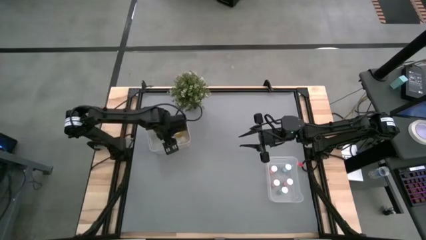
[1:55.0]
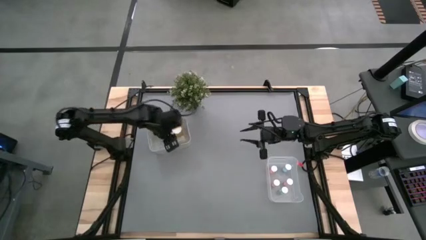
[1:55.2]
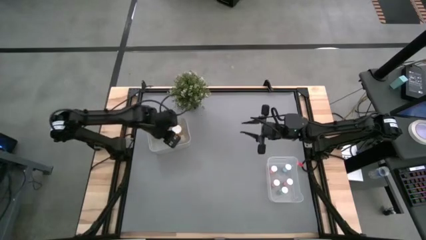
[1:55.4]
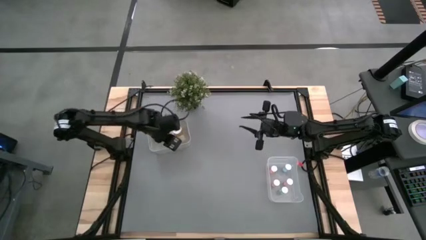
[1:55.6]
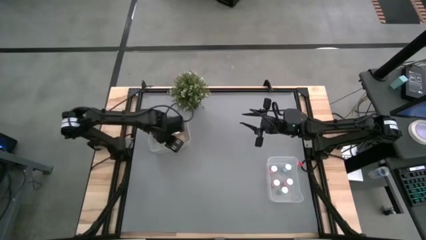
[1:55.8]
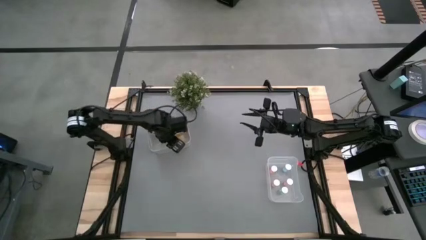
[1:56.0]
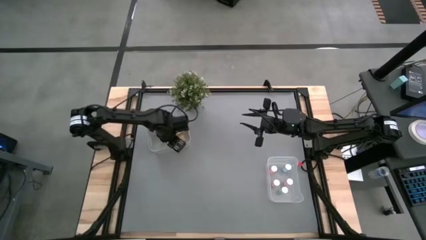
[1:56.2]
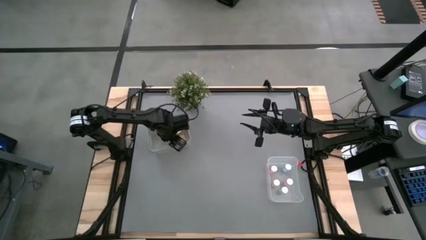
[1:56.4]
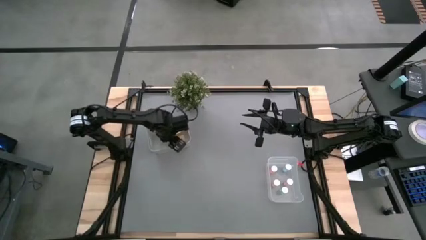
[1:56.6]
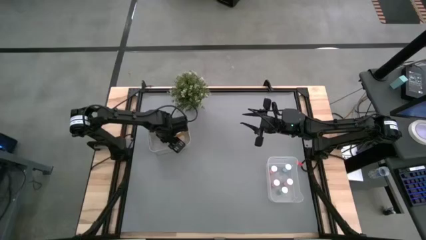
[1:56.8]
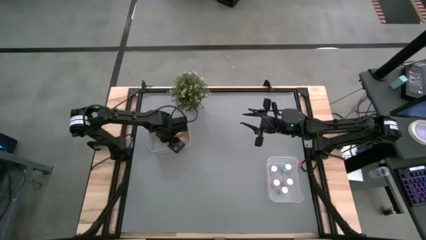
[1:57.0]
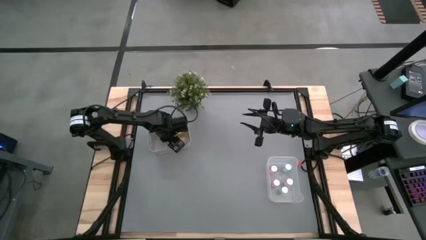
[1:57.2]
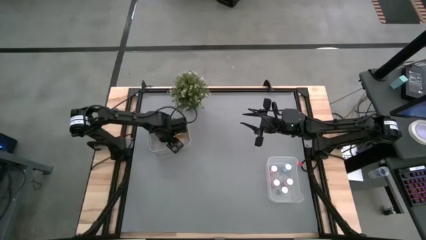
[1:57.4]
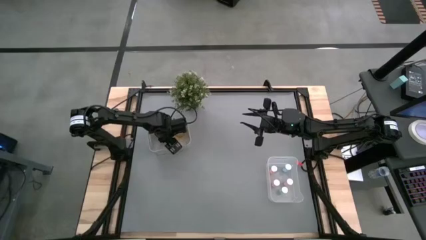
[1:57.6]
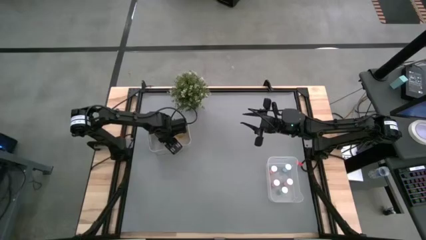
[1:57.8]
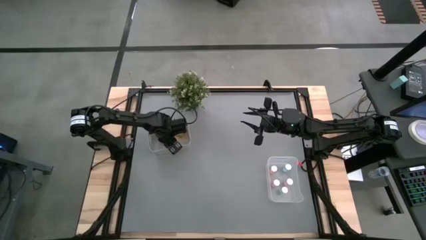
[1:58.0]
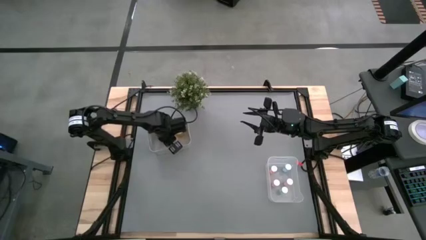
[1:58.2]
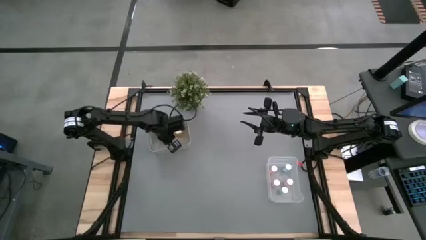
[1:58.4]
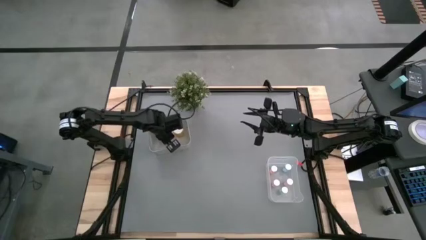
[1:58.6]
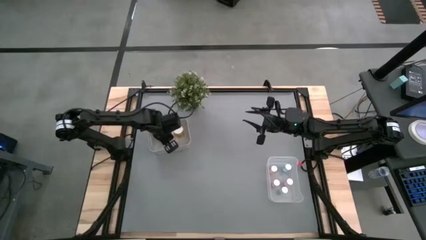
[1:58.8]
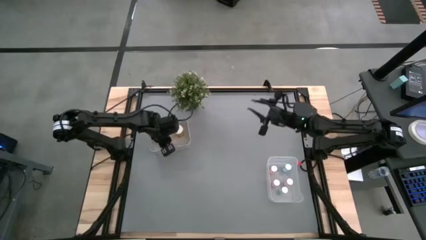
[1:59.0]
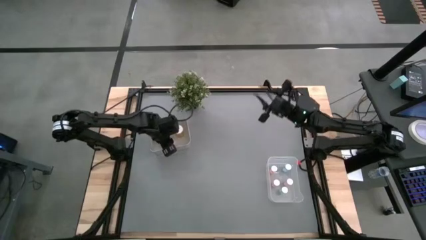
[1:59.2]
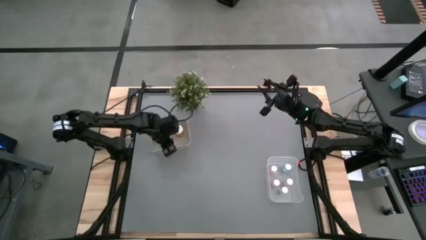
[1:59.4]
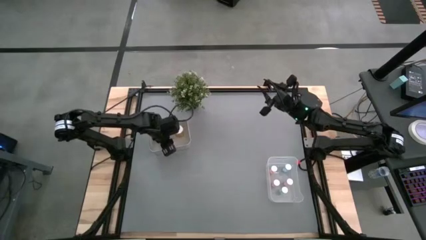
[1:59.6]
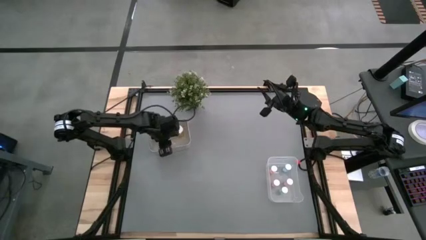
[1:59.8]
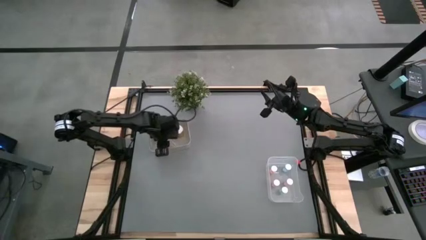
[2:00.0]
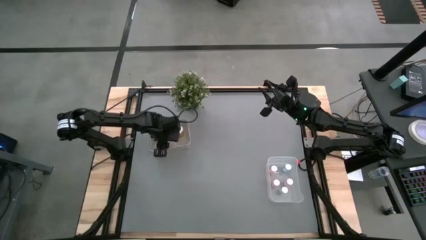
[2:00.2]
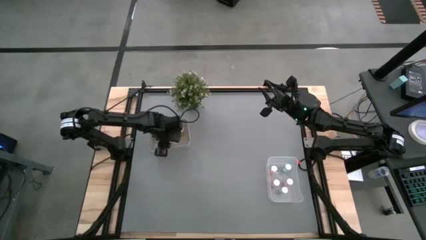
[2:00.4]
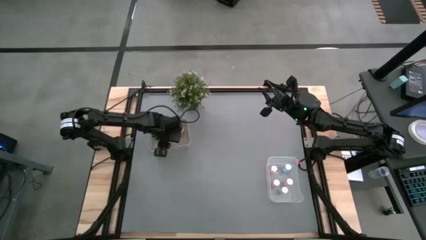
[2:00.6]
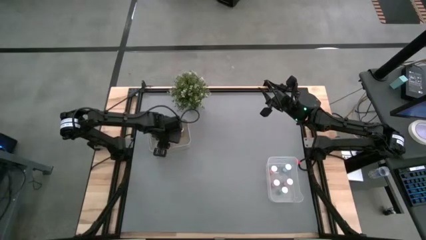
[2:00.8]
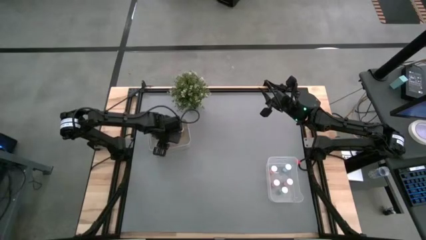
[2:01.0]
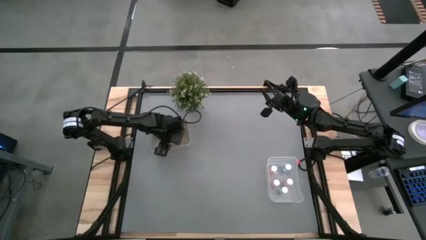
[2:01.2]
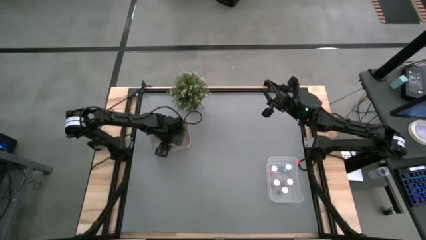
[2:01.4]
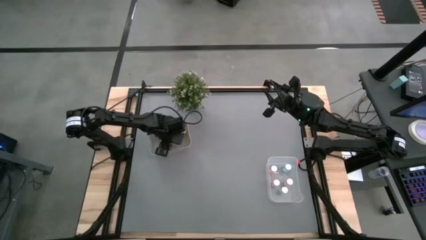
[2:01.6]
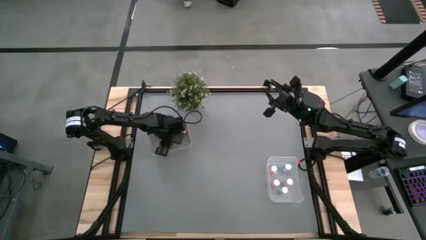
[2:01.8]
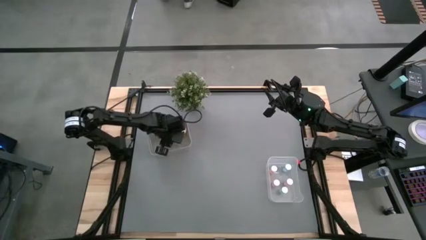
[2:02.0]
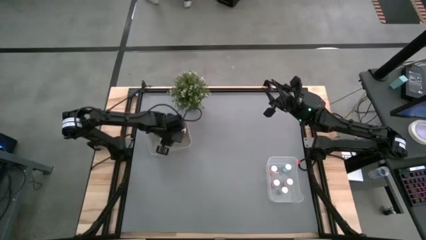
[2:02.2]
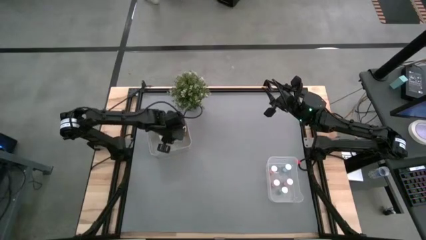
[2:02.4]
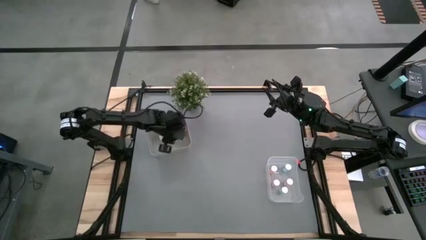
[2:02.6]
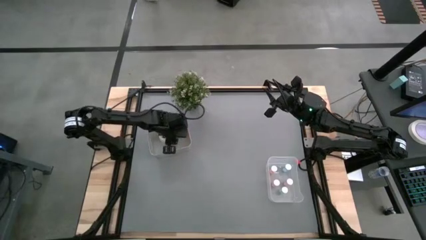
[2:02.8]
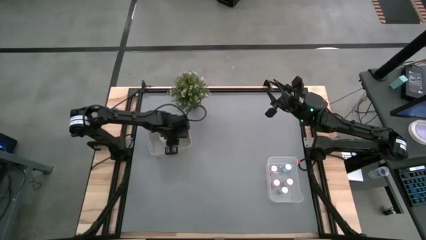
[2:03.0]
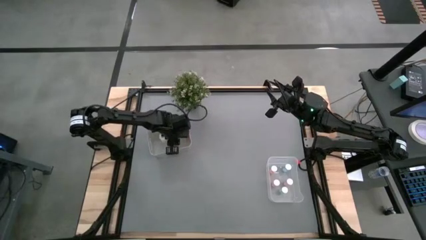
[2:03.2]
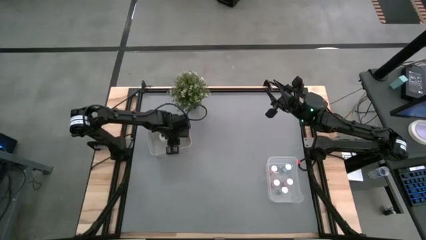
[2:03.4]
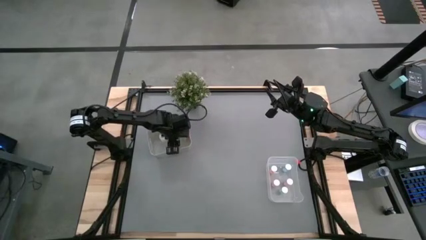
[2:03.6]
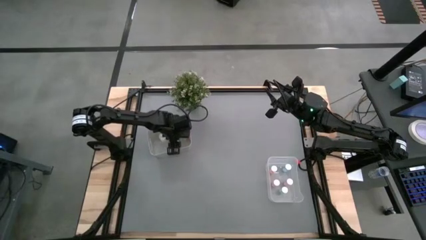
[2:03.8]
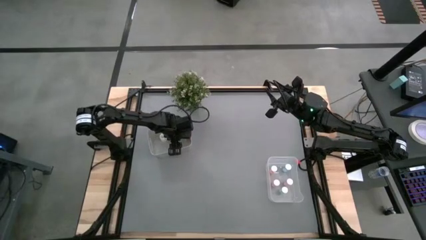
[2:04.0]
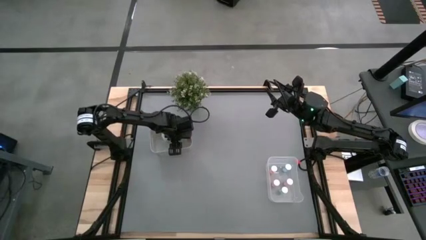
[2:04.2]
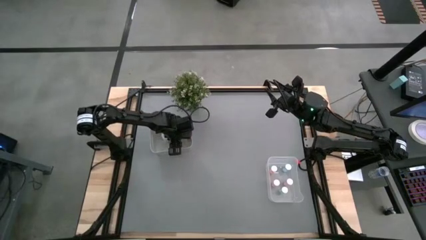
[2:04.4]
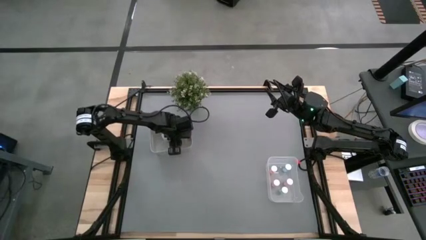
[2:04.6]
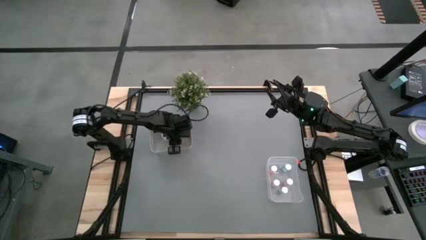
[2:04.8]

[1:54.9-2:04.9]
Task: Pick and place medicine bottles into bin by pill shape (circle, oval)
Put the transparent pill bottle into the gray bin

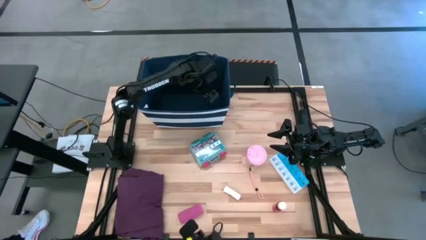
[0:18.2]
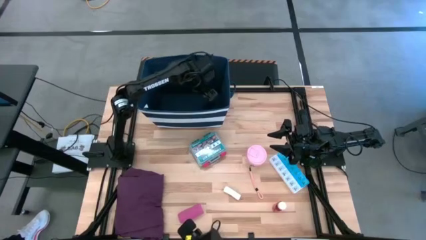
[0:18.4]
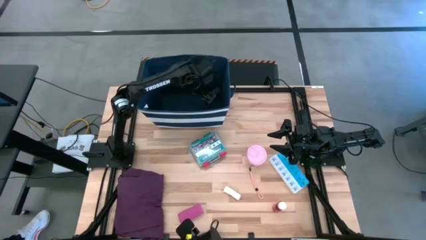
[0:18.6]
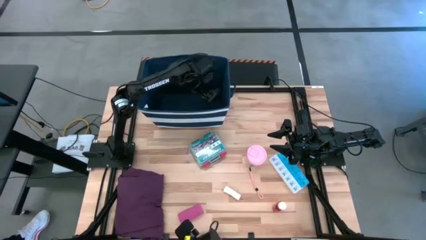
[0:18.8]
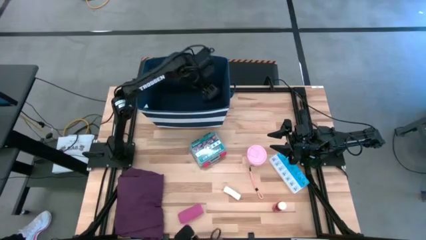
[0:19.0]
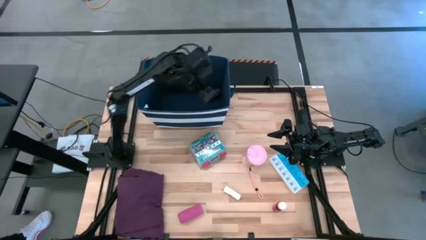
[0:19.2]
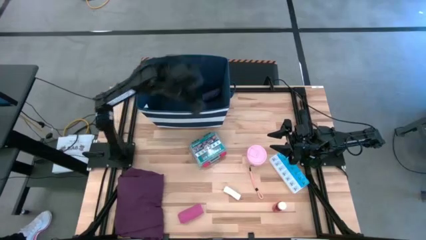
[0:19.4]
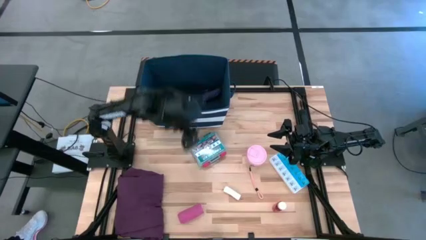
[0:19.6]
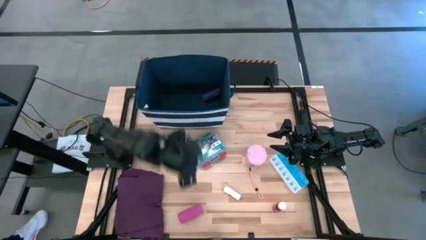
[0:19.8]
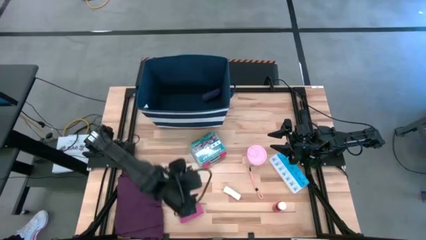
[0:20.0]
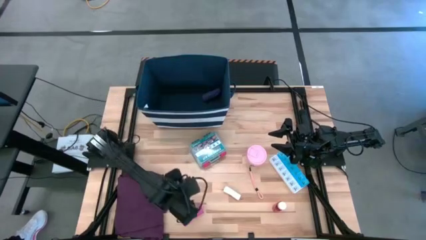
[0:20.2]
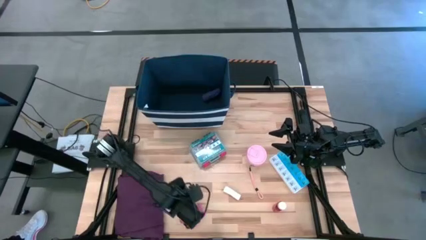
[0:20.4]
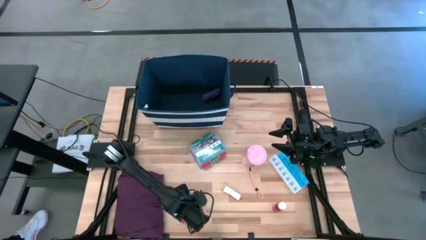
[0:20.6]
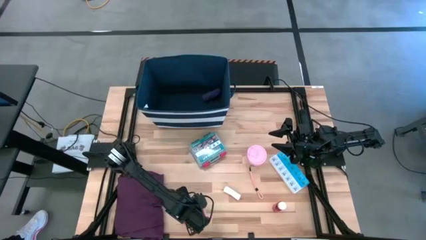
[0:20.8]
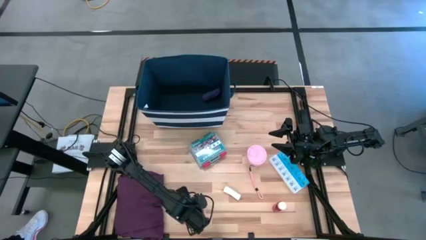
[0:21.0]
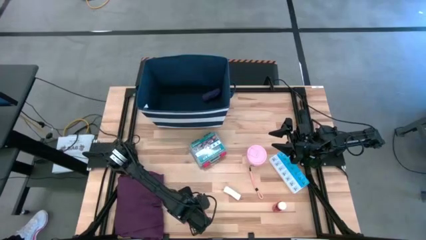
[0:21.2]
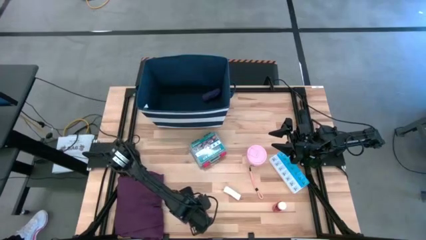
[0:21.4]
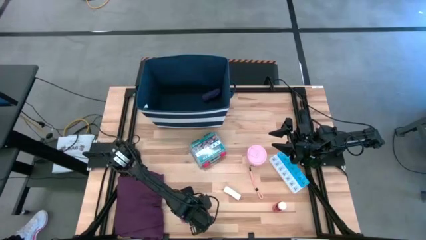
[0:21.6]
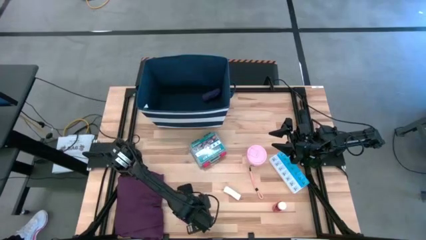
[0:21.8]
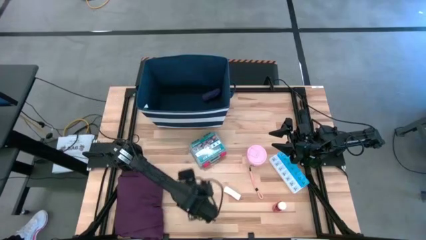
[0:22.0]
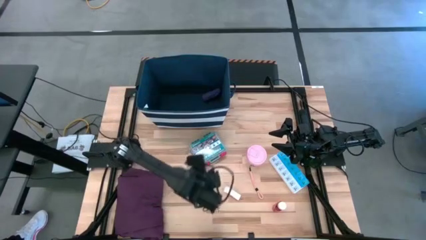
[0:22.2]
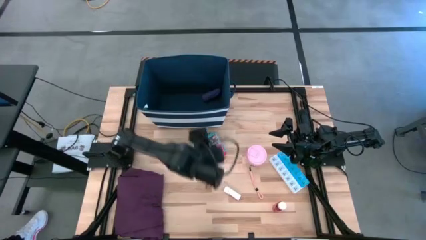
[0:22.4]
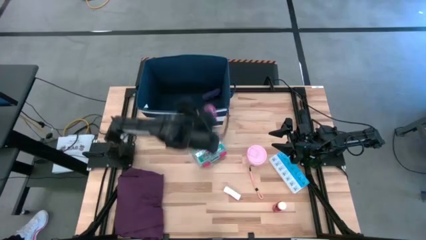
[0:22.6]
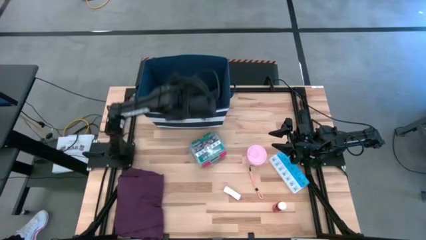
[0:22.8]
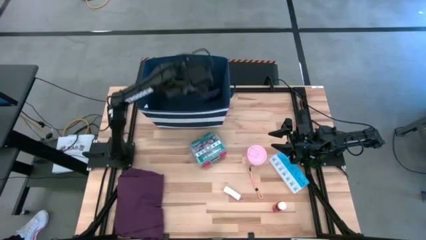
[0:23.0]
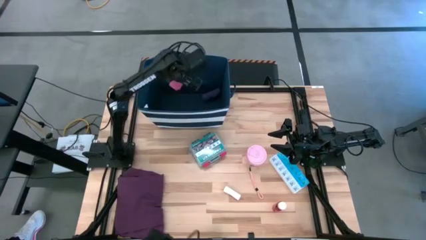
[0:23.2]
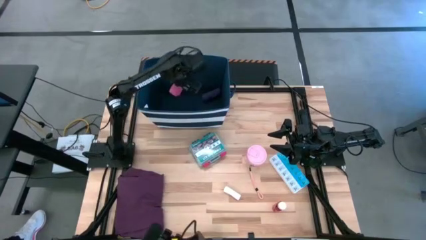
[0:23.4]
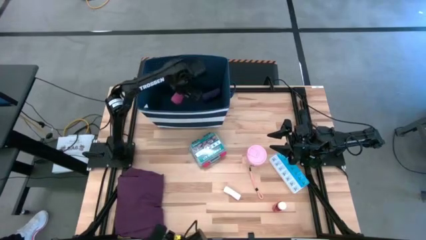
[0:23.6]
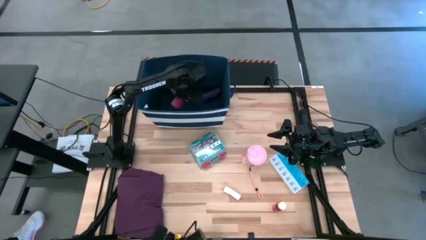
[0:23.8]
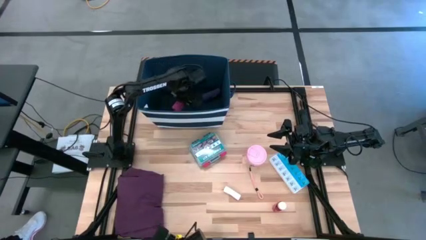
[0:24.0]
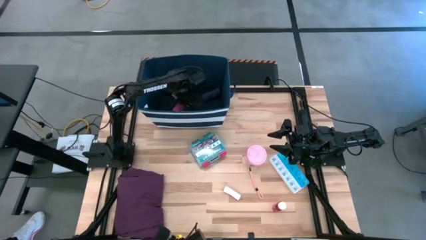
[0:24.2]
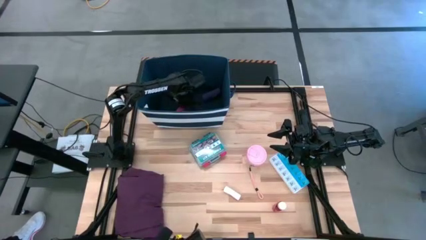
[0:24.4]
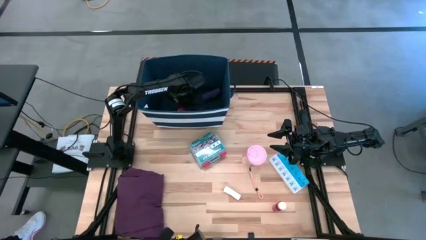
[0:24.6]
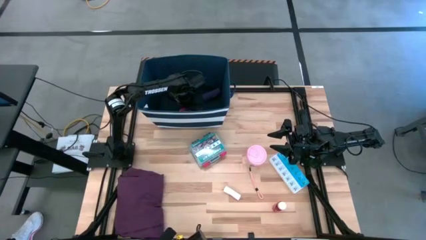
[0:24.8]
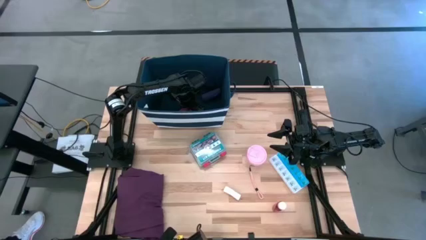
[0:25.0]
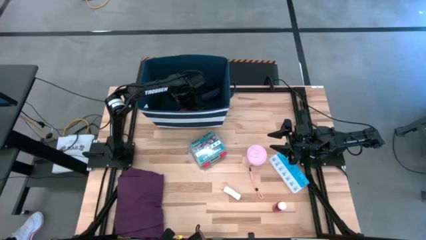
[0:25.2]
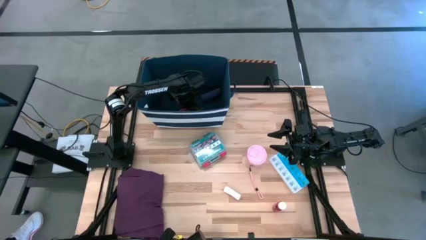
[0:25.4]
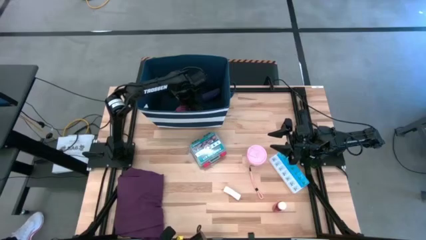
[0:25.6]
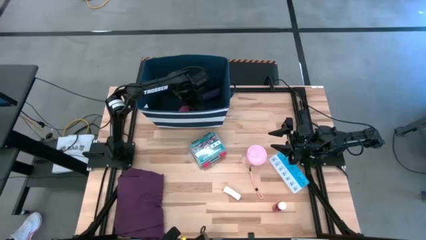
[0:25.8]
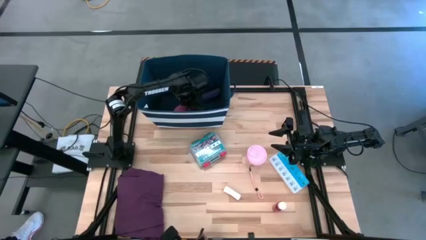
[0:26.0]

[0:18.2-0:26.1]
Task: Pick & place medical supplies in basket/bin
Put the pink bandage into the blue bin
